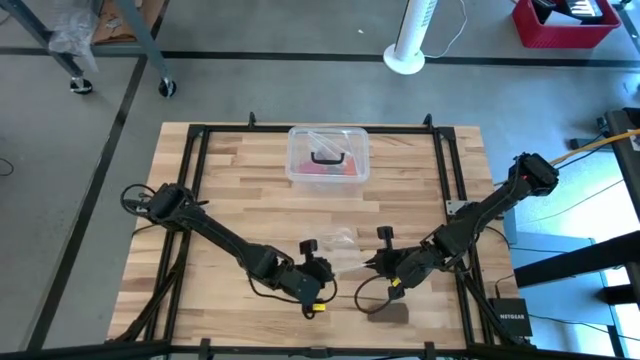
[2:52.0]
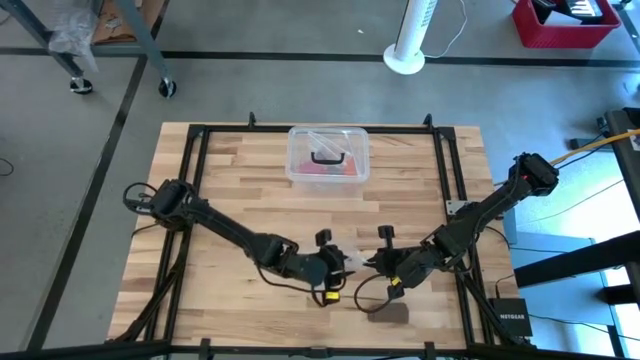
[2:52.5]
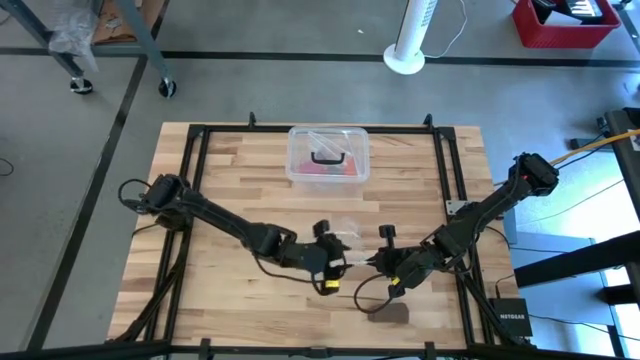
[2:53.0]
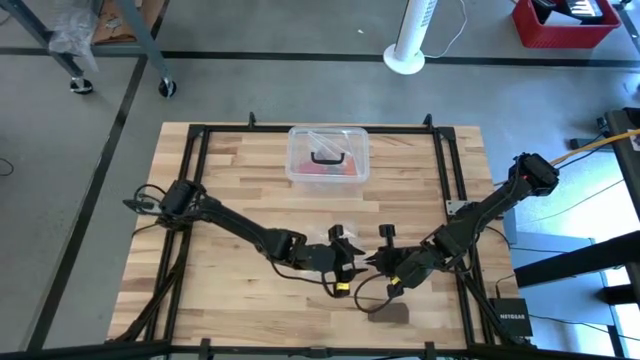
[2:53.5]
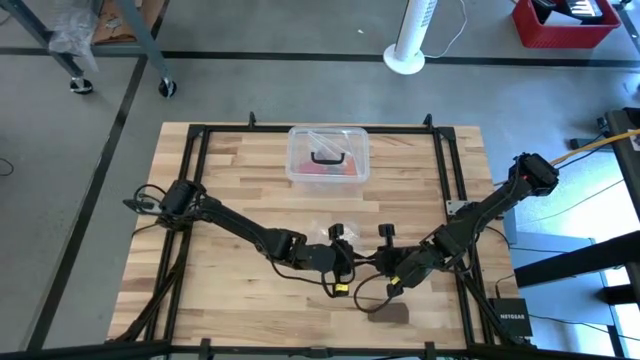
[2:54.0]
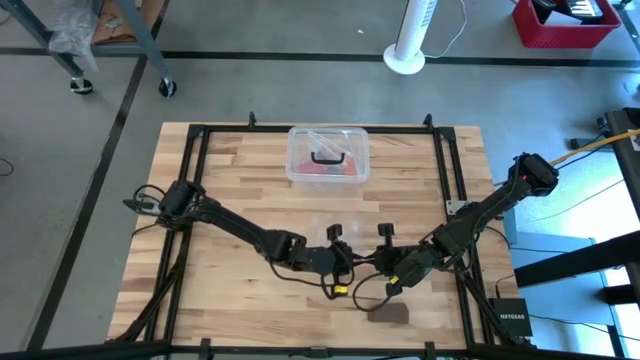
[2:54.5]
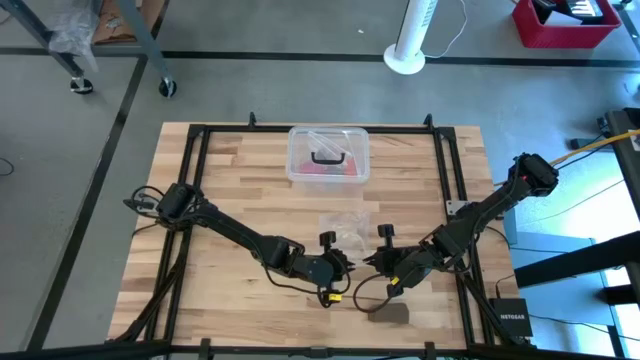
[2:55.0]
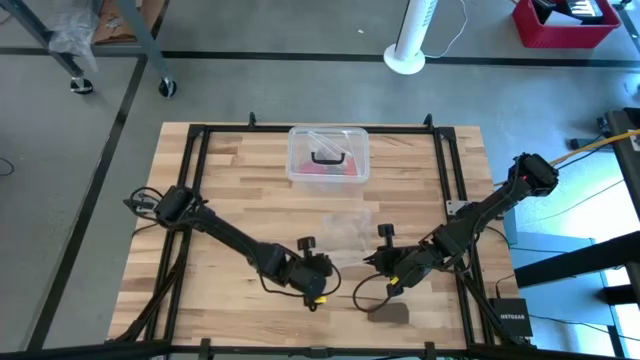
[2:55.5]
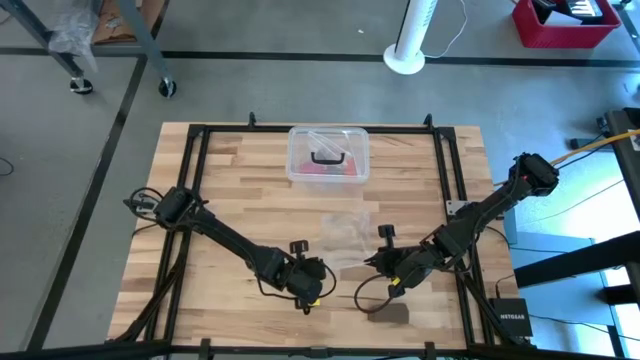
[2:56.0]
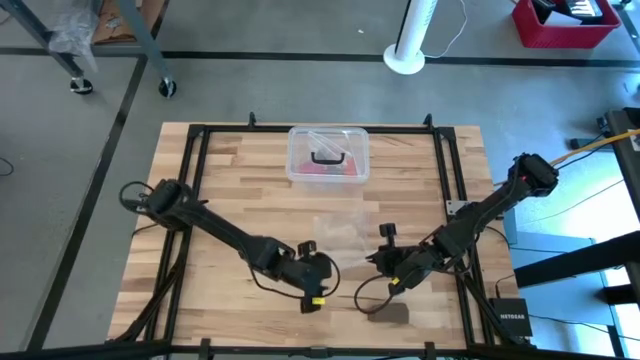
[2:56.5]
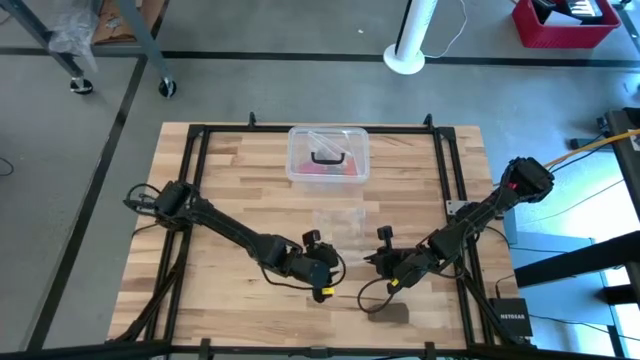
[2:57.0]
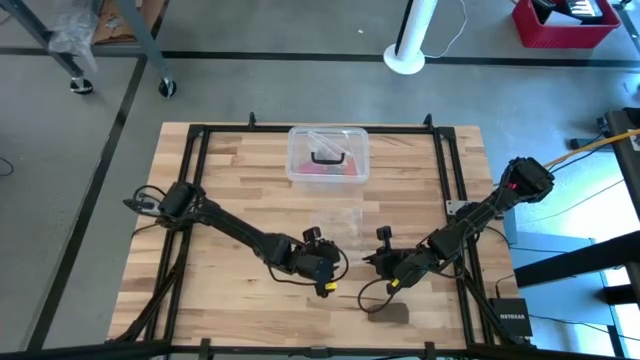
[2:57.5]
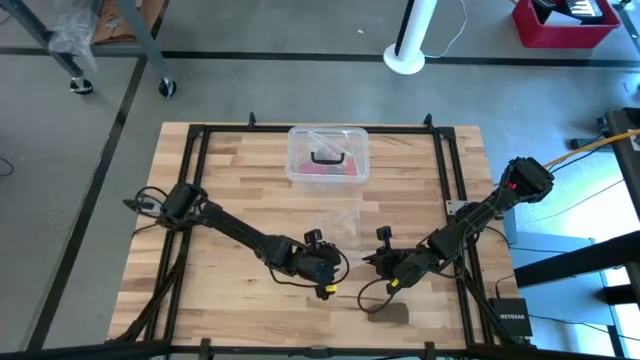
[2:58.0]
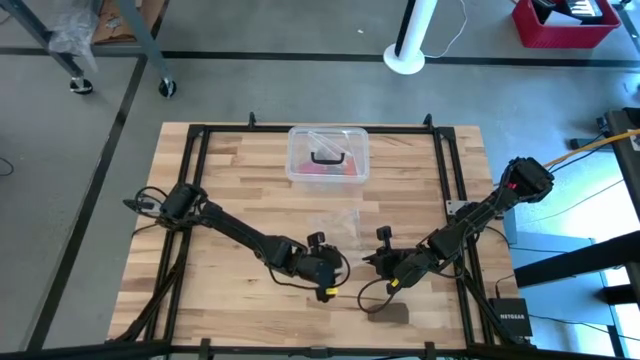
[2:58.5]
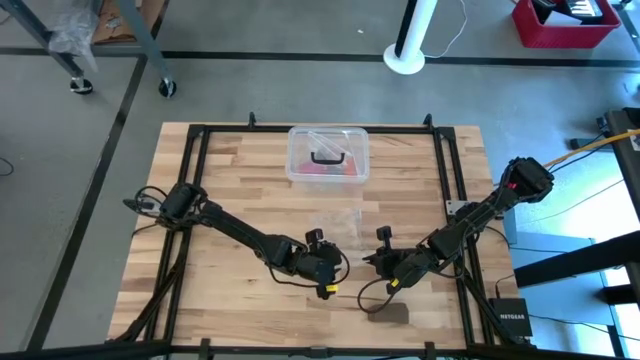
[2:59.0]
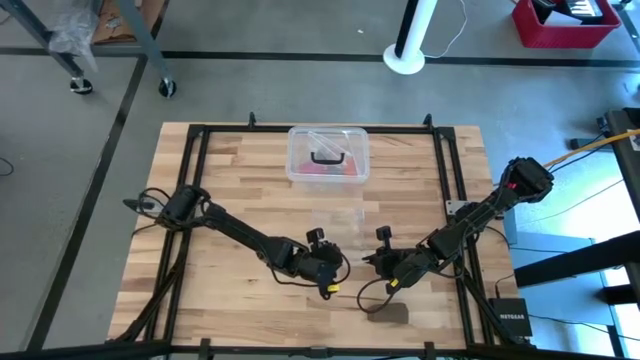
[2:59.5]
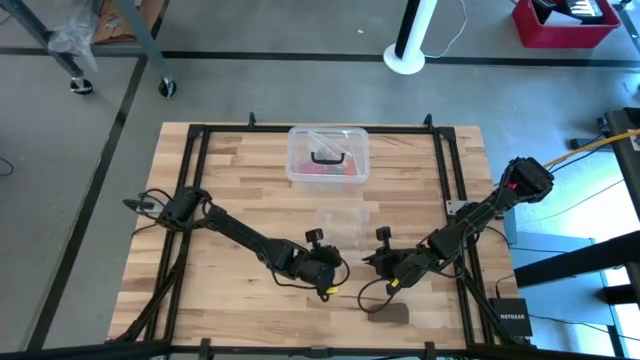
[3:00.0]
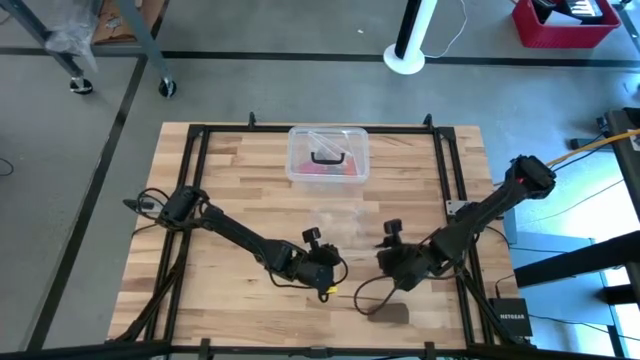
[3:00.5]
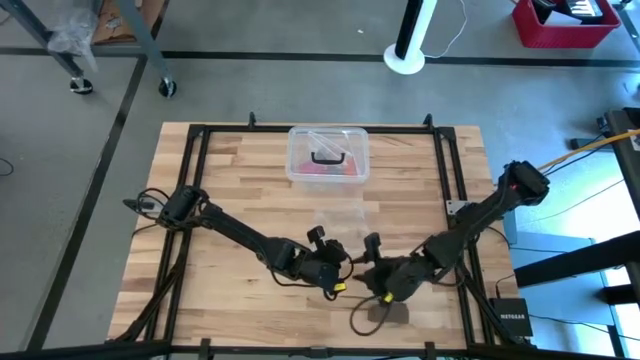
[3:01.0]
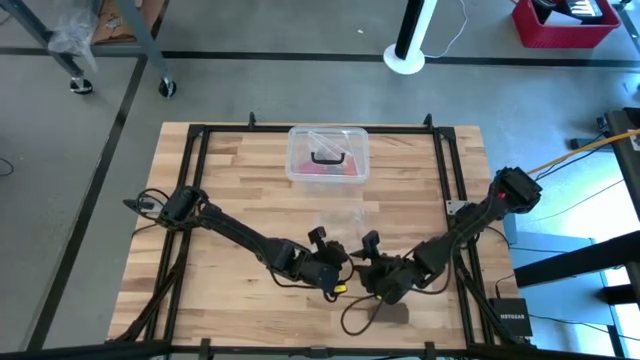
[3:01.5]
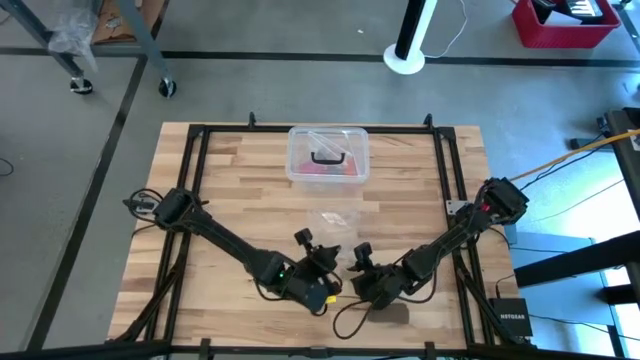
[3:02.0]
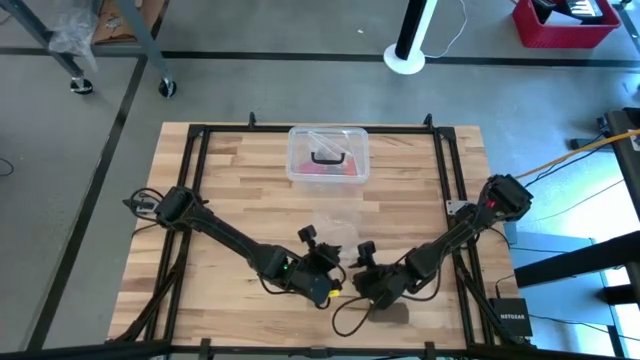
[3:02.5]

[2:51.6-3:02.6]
Task: Roll bandage
Open the transparent zip bag

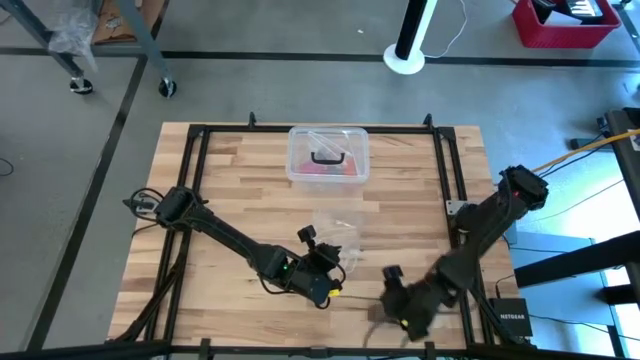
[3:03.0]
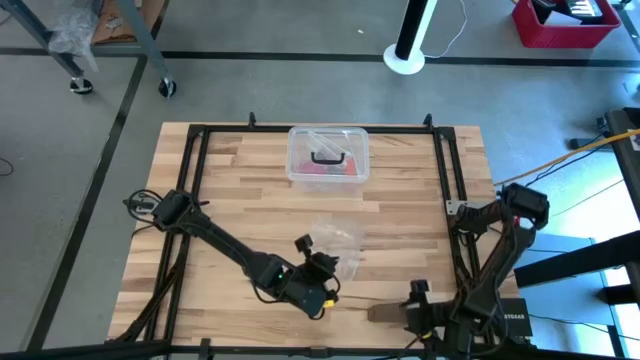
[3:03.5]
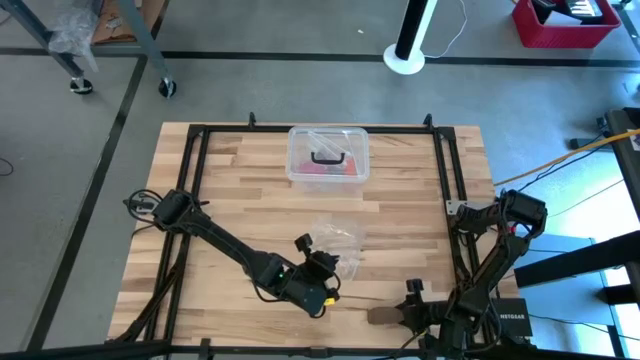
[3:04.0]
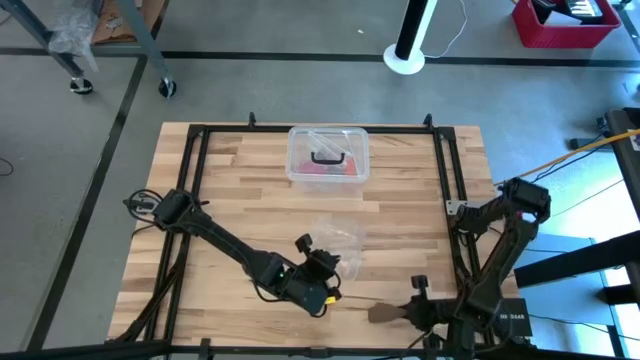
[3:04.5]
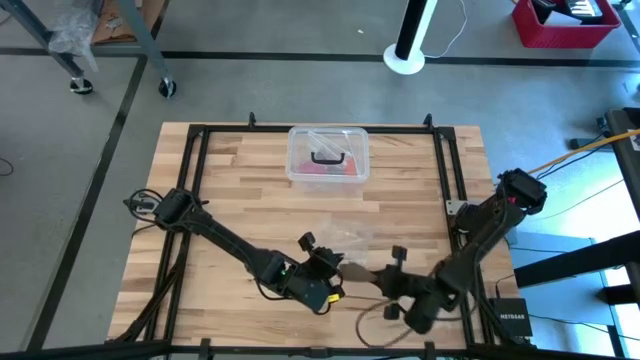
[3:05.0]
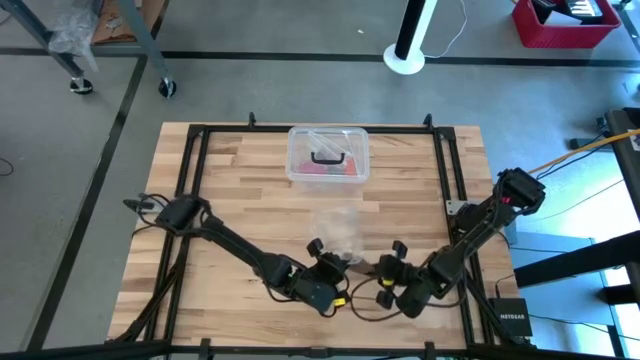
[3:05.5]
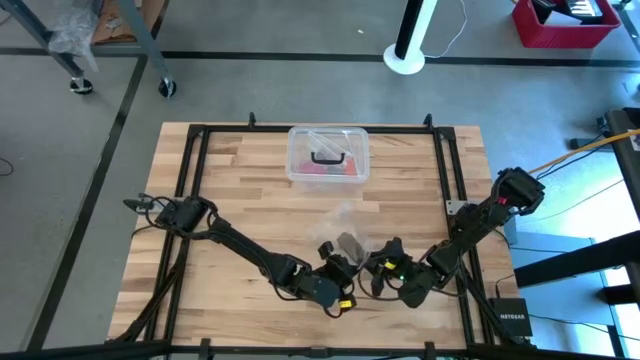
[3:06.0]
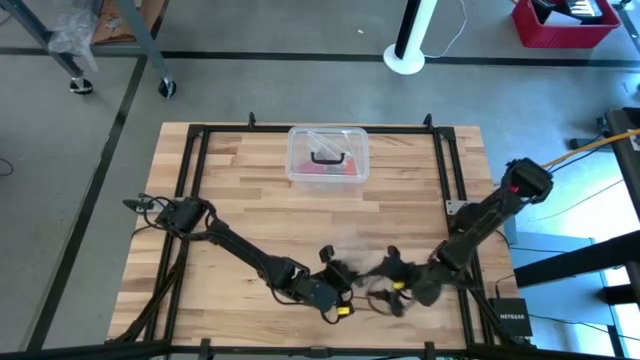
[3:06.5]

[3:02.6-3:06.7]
Put the rolled brown bandage into the transparent zip bag

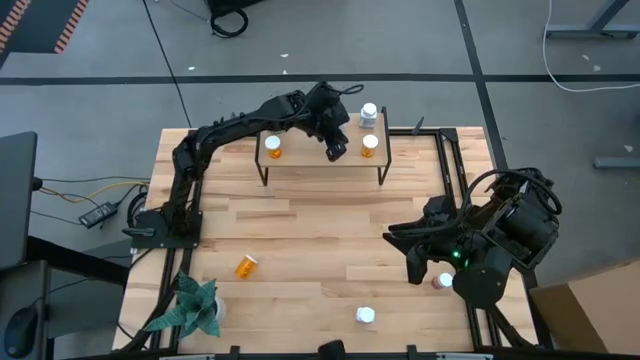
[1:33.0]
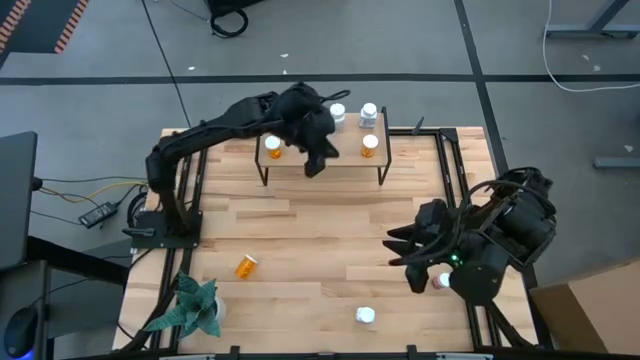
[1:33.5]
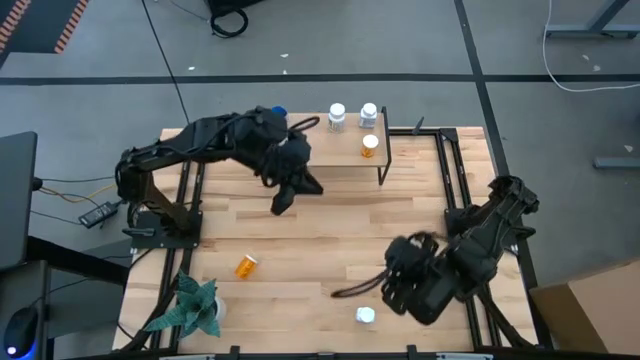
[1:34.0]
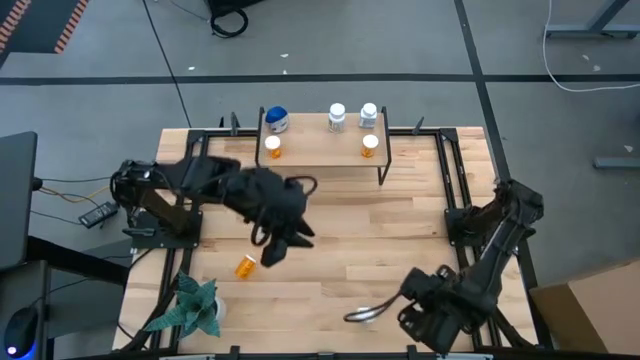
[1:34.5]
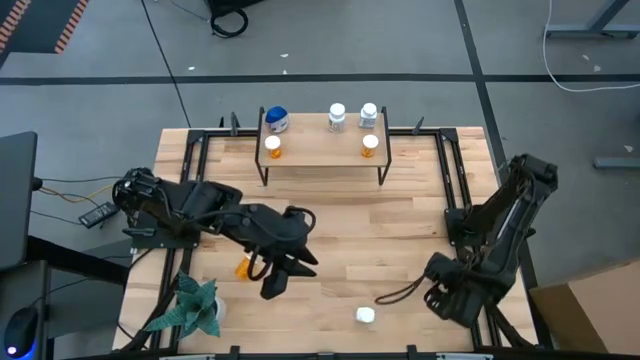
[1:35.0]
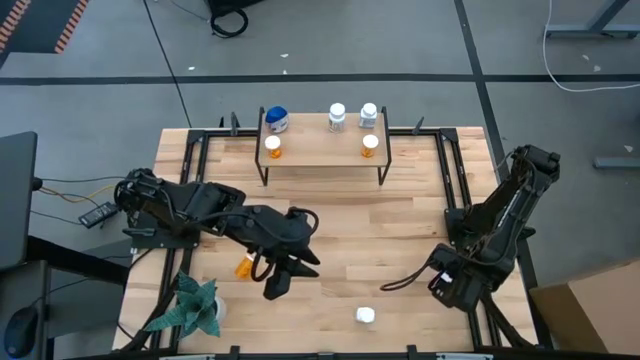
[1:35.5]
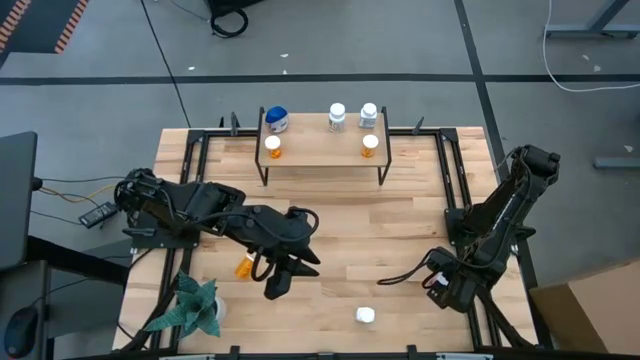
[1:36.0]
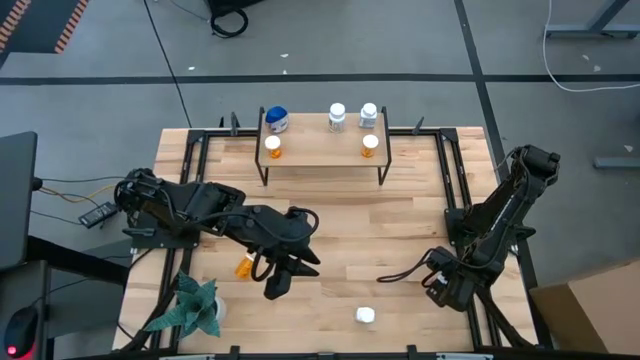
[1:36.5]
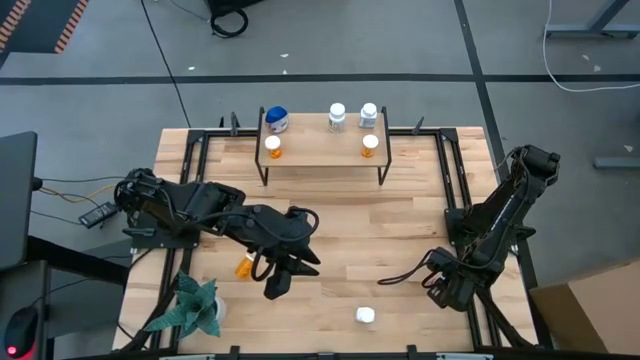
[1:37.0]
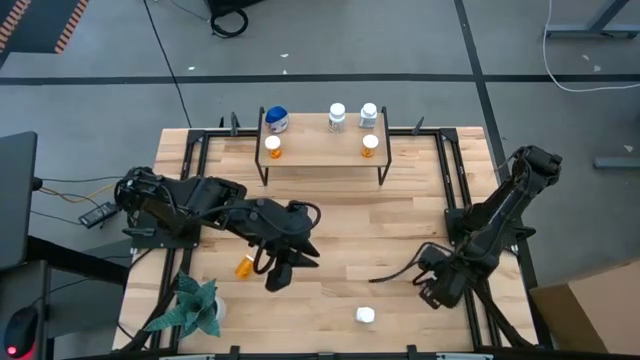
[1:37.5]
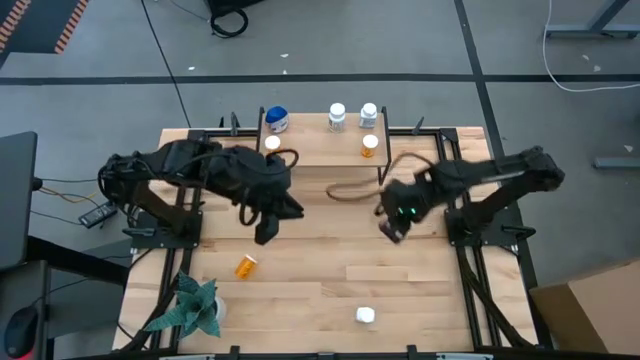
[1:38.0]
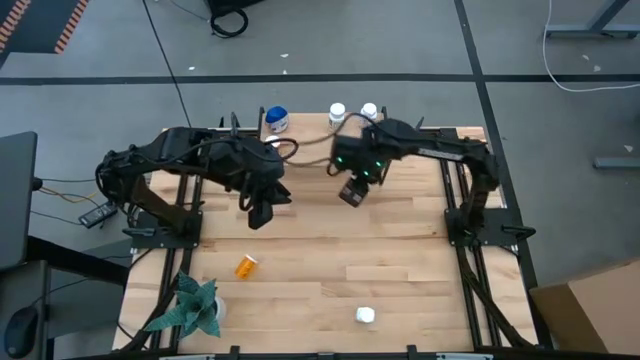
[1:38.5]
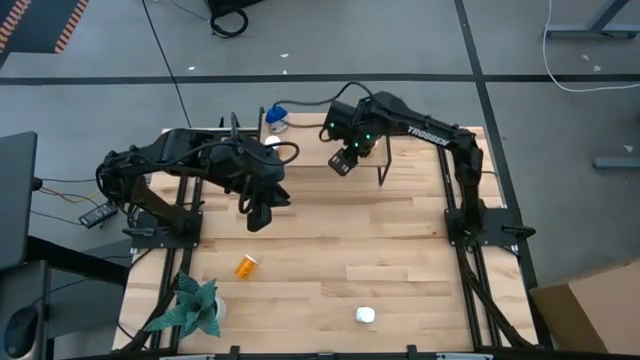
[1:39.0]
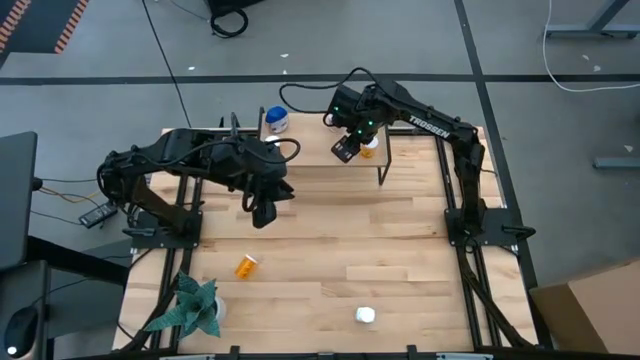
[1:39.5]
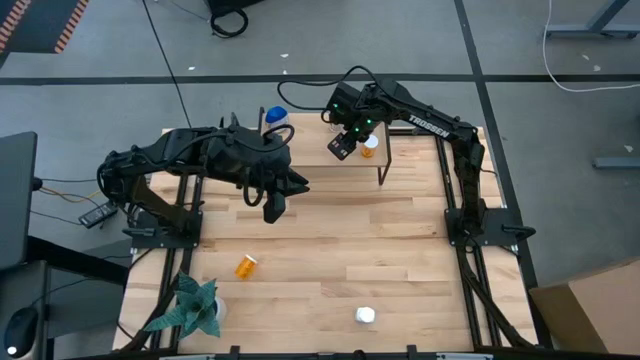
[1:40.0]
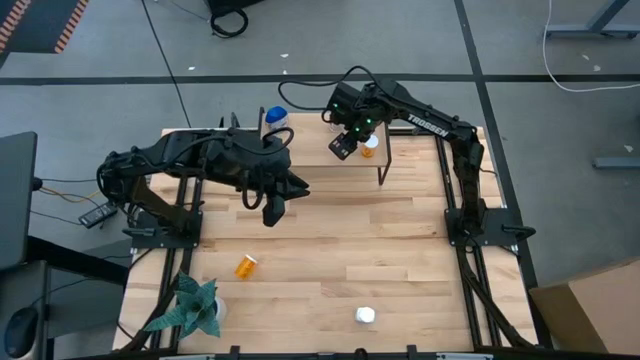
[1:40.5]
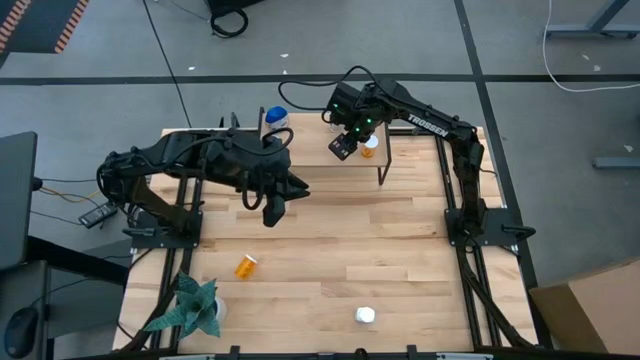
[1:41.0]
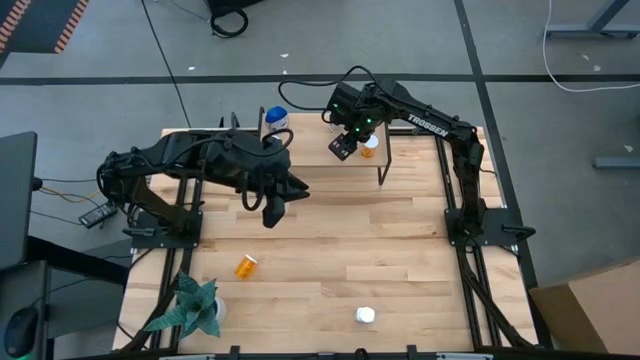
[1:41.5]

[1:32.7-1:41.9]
Task: Pick and place medicine bottles onto shelf by color
Put the pink pill bottle on the shelf
